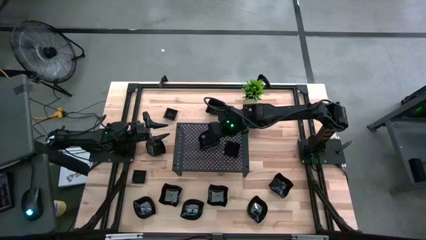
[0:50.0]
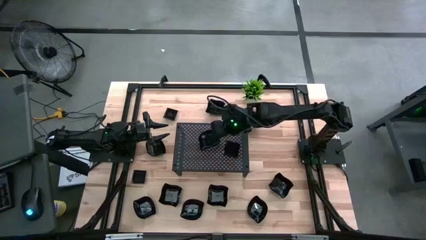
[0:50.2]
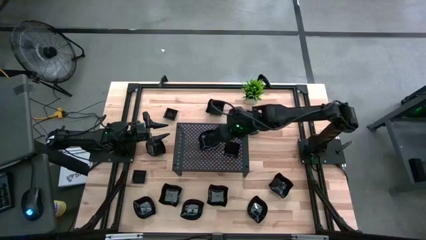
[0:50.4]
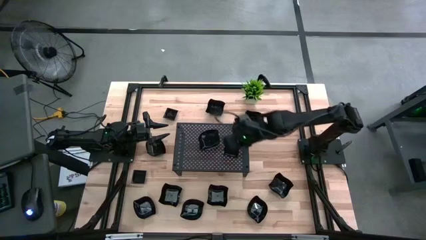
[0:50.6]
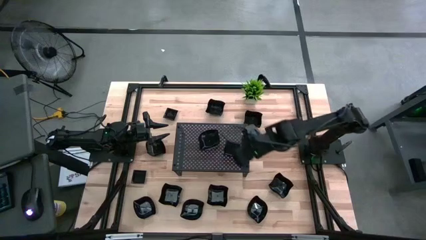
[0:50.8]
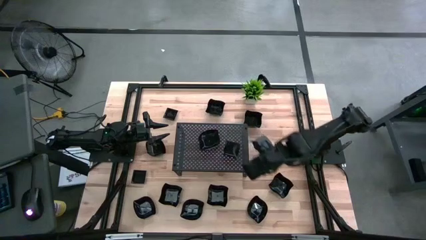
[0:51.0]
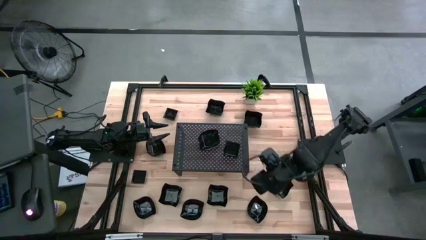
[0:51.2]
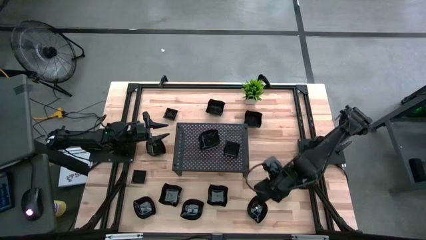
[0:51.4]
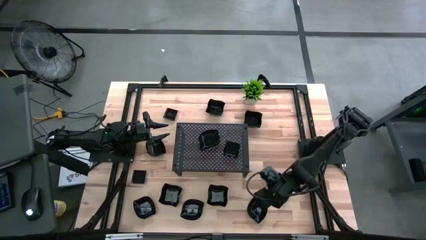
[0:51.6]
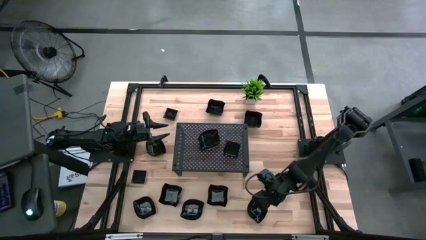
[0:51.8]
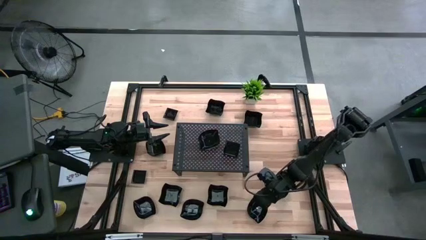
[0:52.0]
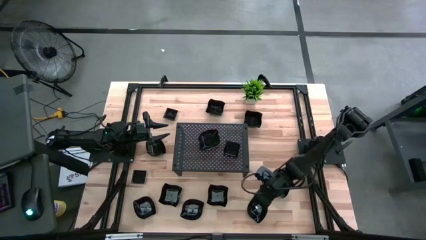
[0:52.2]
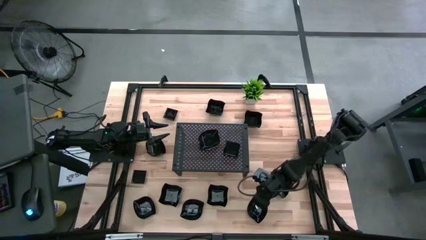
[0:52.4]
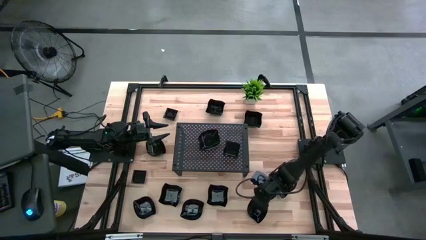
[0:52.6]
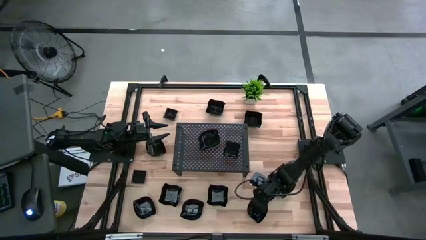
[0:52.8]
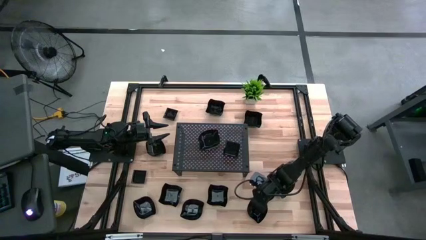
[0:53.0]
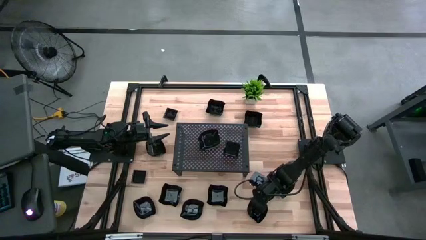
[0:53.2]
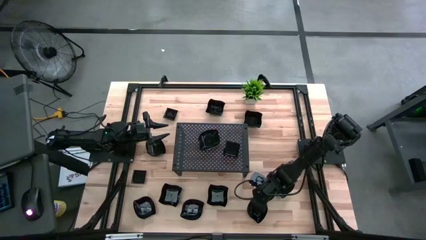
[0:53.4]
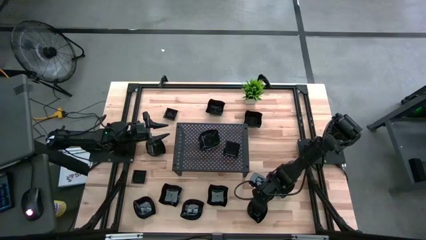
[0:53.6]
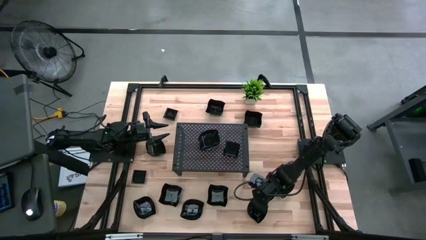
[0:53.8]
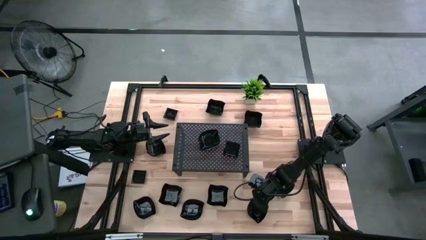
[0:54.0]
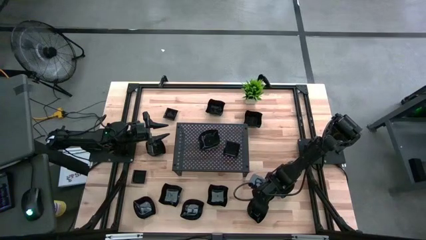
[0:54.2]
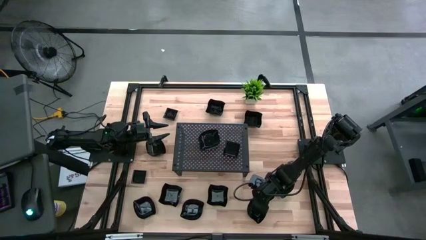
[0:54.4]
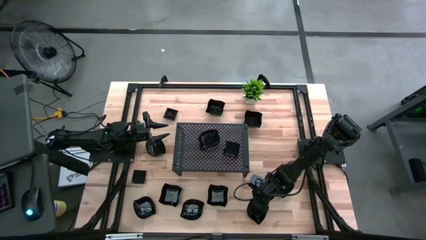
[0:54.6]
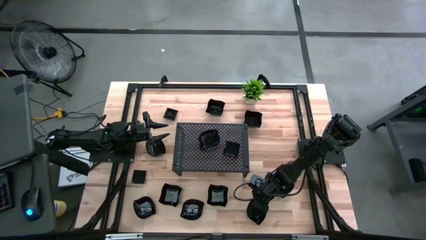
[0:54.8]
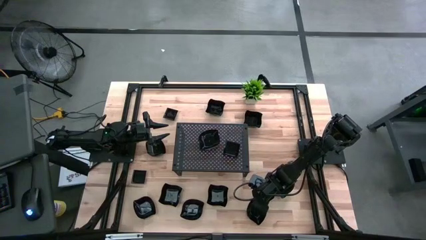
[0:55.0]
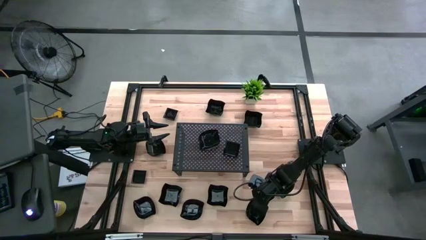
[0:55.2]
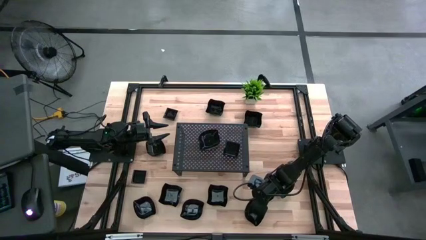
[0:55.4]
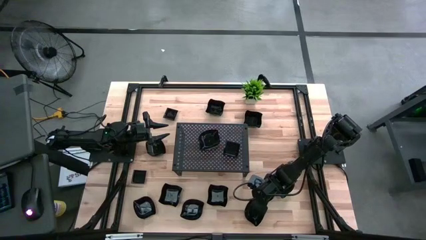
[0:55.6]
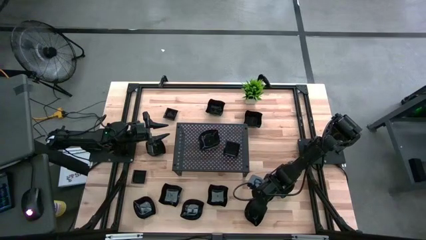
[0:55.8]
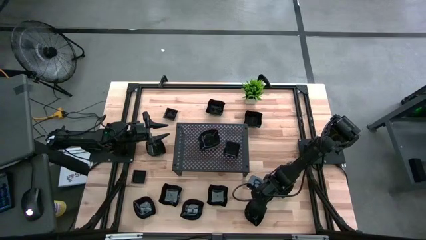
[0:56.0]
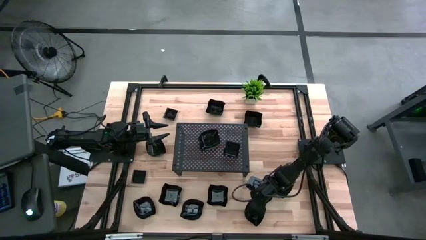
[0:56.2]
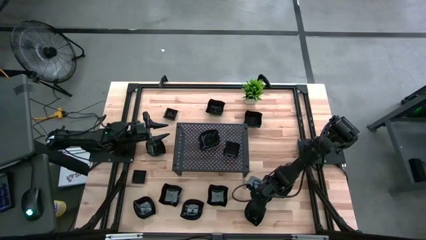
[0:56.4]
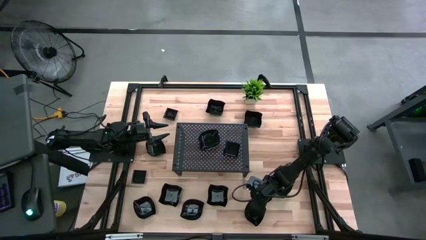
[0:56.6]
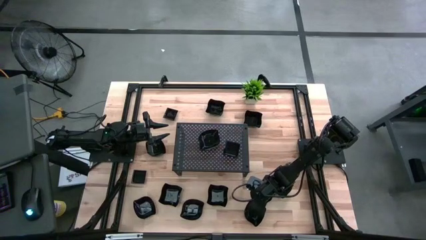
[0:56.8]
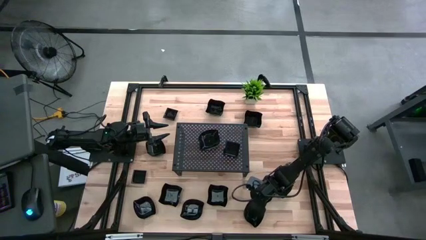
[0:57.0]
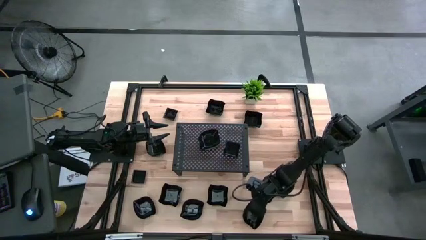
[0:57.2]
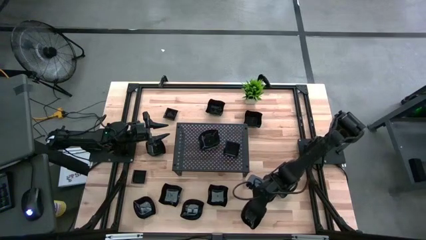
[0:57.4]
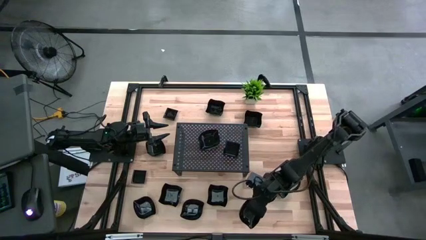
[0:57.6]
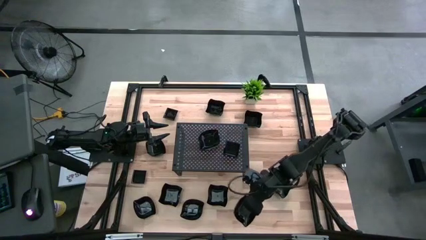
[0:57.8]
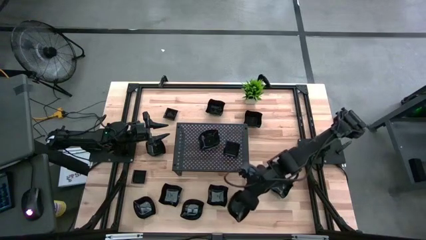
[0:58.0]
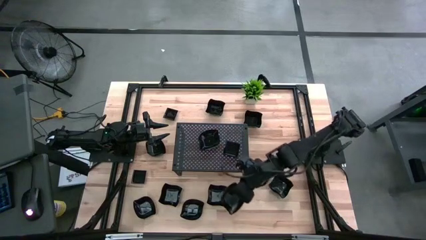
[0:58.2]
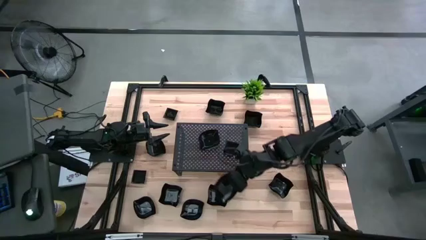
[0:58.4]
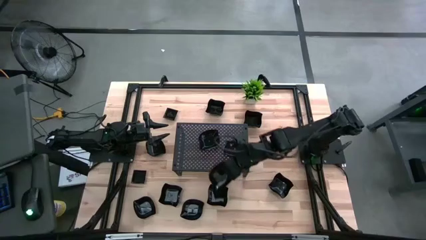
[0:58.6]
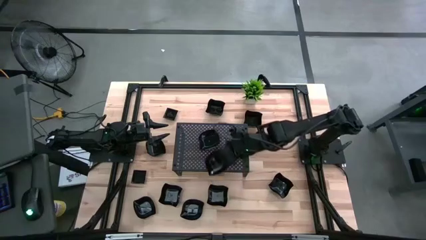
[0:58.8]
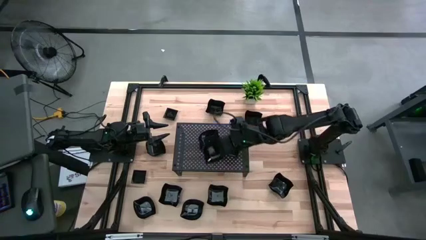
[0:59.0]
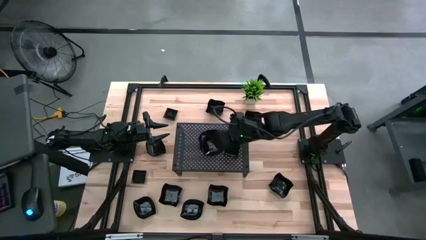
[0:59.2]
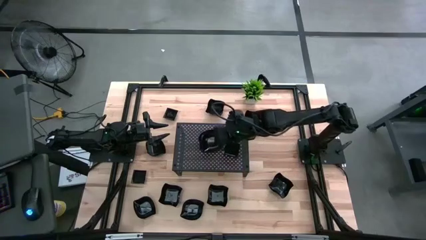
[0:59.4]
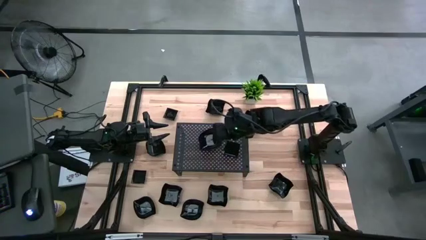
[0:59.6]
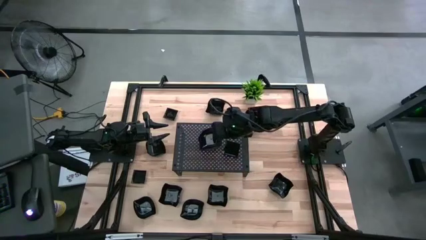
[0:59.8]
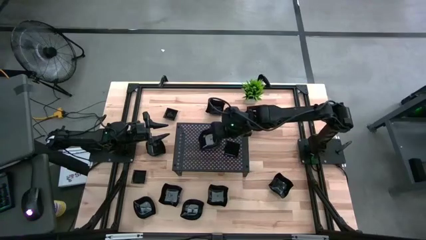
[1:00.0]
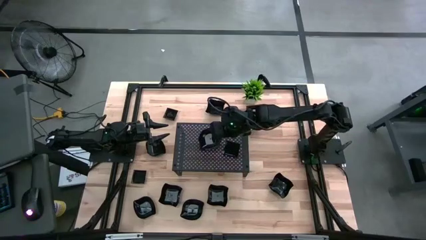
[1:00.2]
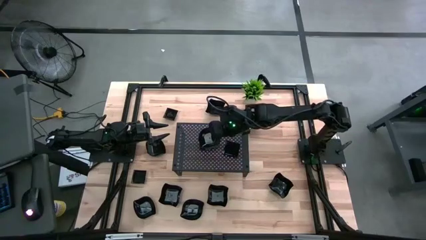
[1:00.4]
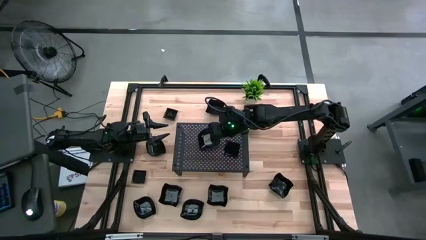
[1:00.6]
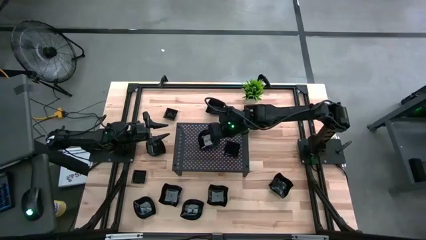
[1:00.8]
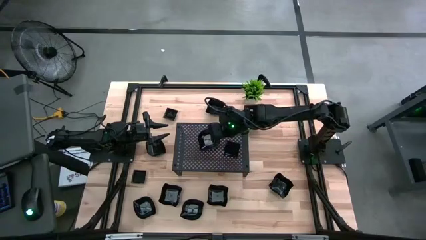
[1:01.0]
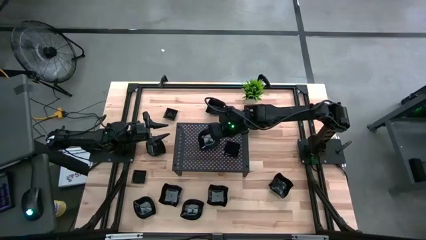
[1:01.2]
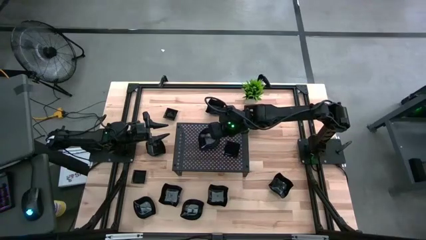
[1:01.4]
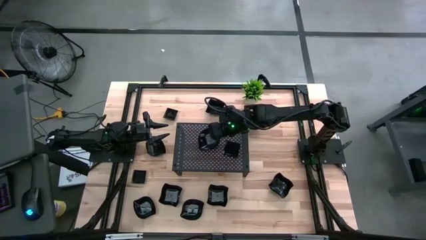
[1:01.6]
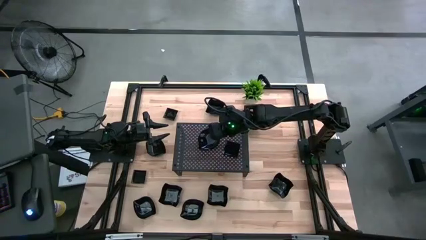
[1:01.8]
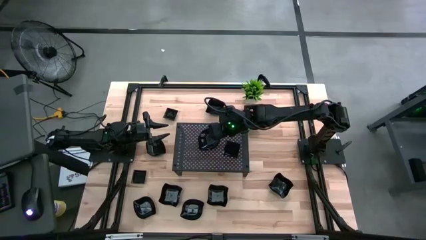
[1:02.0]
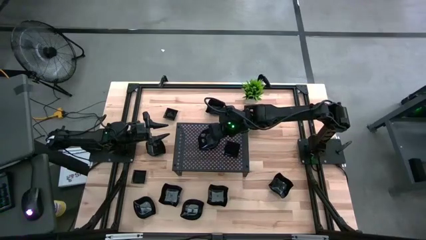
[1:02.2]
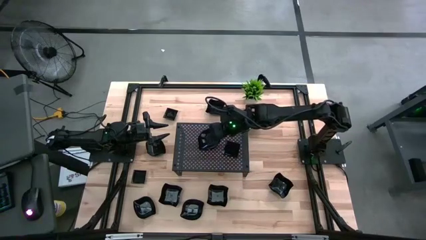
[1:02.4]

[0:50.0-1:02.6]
Task: Pick & Place Mini shaped plates
Stack the leaf shaped plate on top of the leaf shaped plate on the shelf
